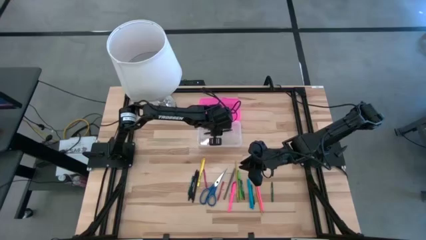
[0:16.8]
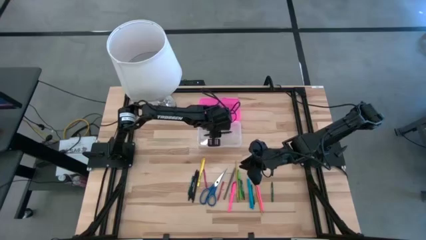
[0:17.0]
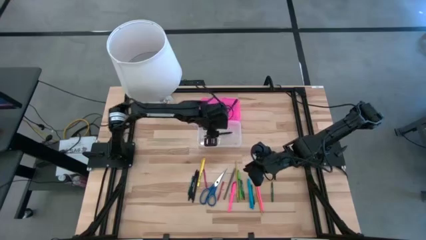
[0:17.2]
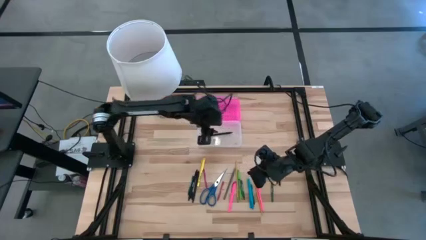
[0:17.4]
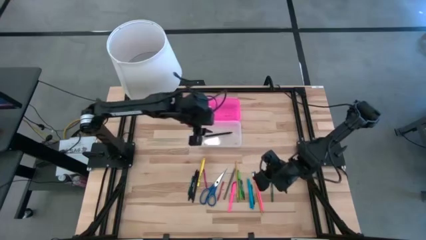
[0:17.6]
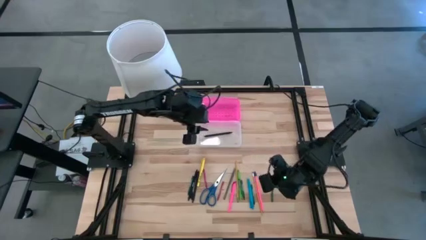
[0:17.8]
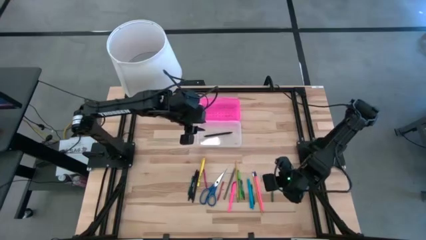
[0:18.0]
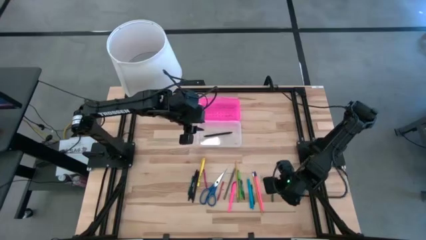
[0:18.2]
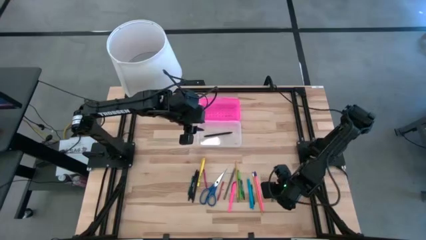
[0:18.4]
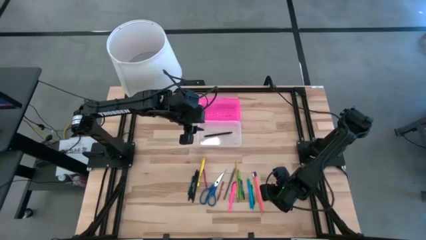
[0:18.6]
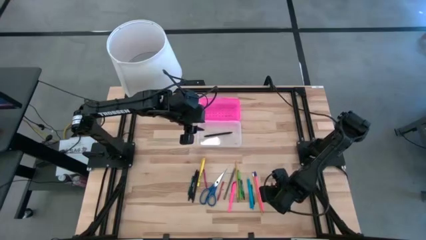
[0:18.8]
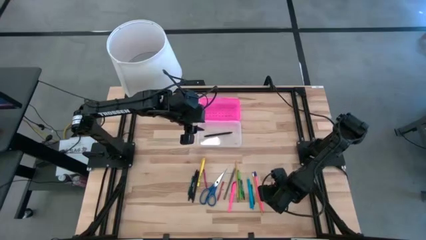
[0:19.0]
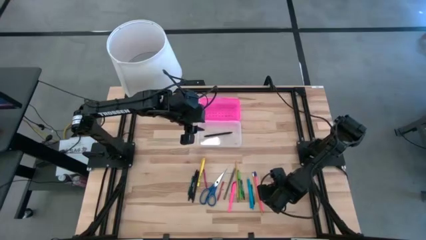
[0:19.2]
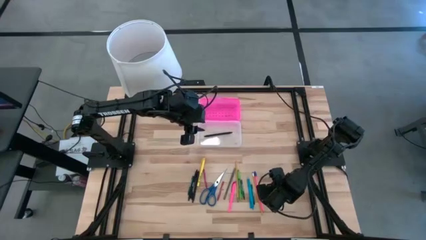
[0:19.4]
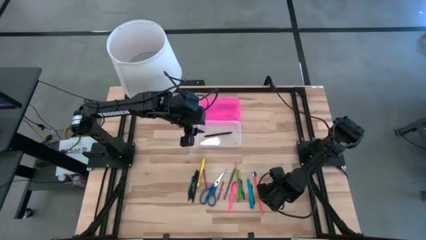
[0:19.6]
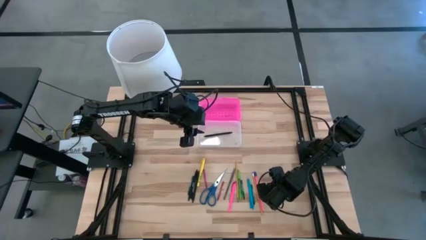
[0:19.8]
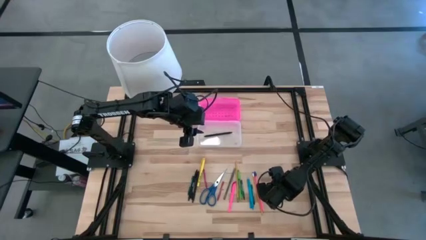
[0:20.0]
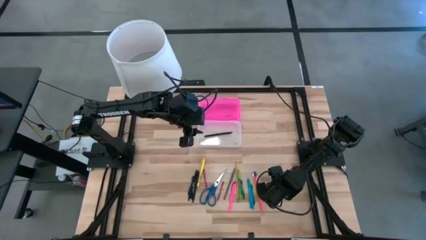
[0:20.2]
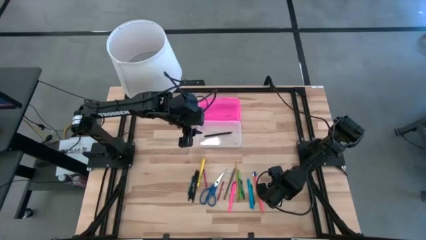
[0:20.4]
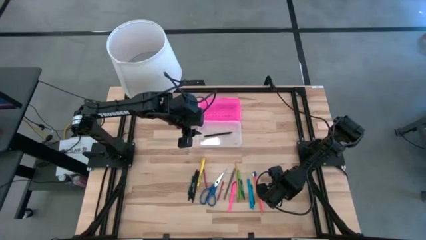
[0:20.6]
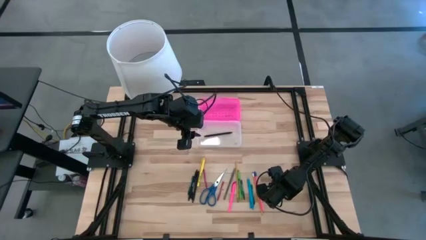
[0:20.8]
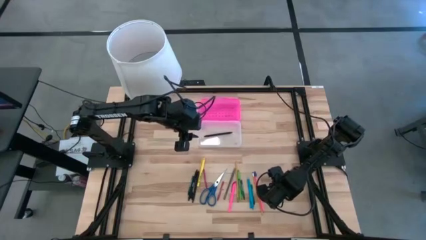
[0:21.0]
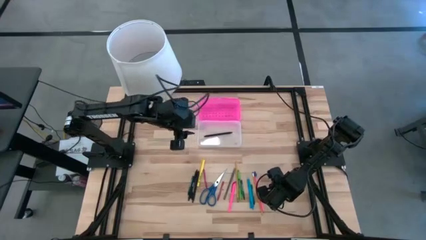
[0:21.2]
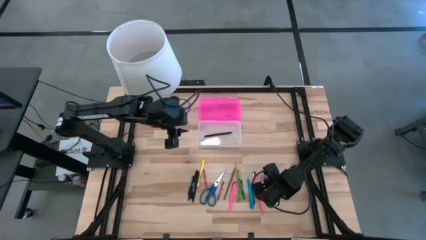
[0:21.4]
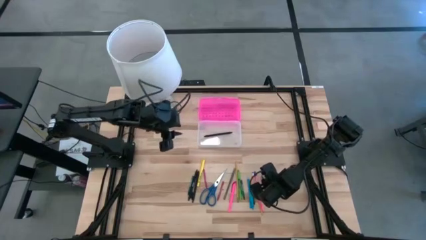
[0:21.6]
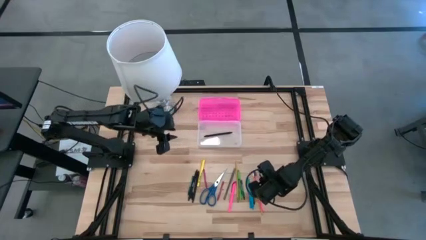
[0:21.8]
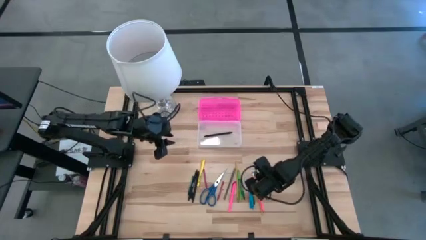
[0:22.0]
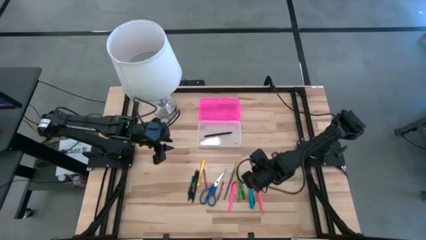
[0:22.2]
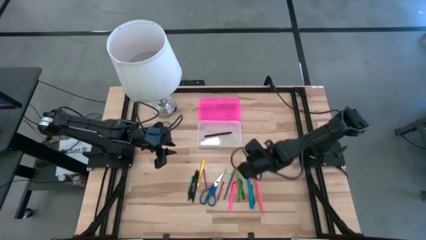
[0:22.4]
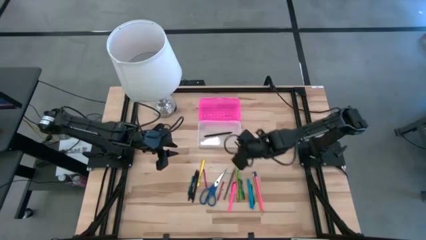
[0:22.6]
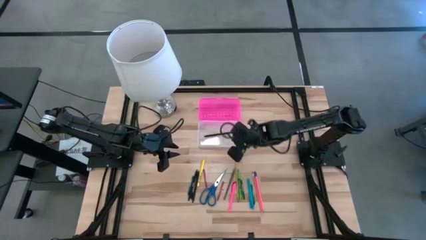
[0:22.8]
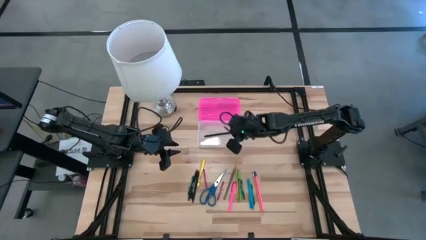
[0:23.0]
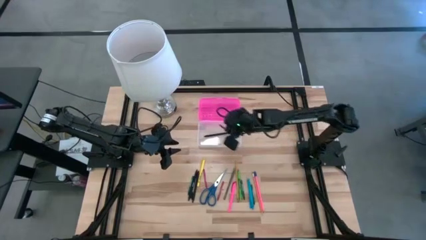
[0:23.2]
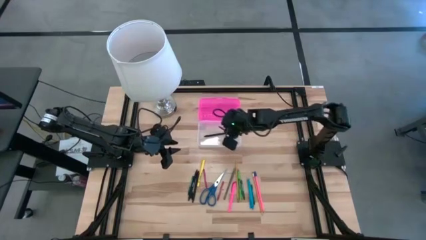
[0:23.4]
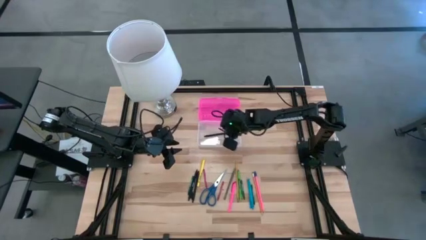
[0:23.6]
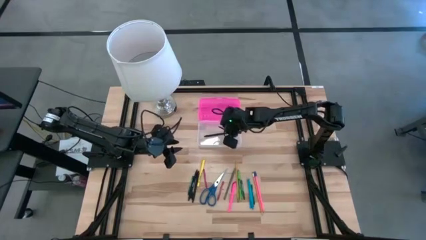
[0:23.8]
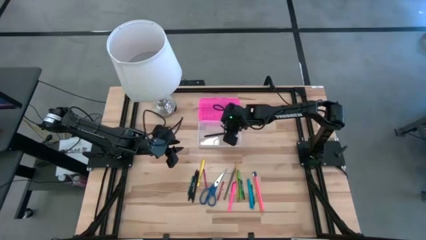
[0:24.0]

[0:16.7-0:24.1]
Task: Pick & place school supplies into a supply box
Put the right green crayon into the pink supply box

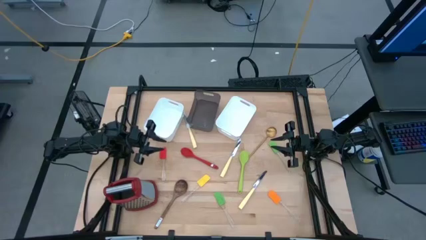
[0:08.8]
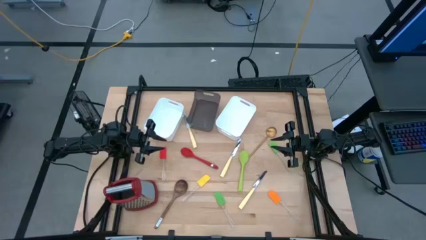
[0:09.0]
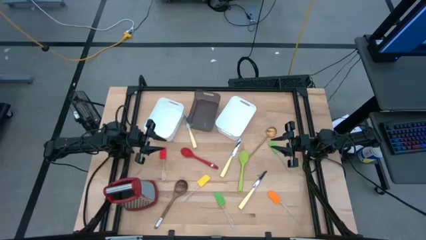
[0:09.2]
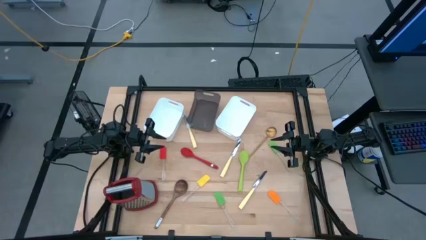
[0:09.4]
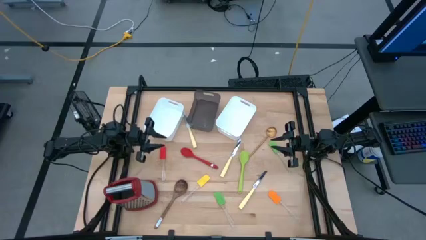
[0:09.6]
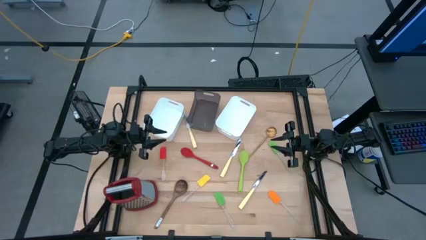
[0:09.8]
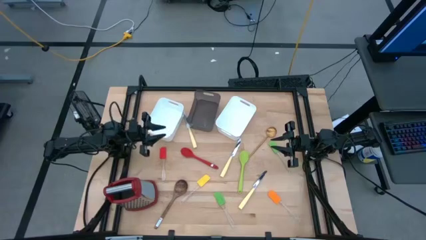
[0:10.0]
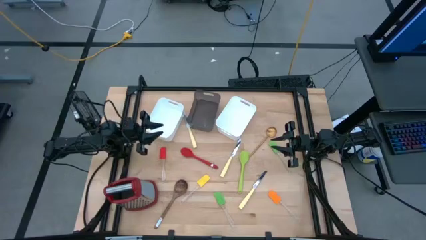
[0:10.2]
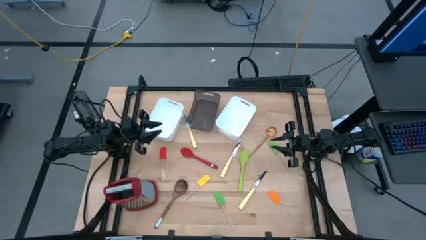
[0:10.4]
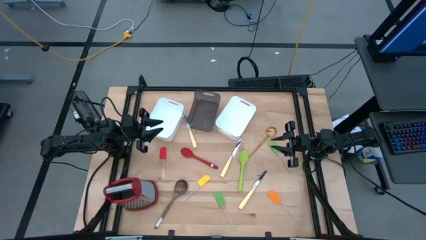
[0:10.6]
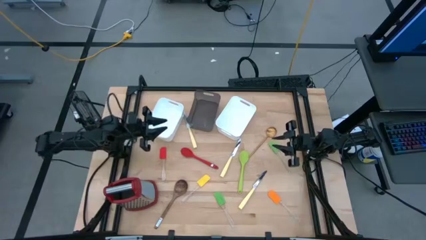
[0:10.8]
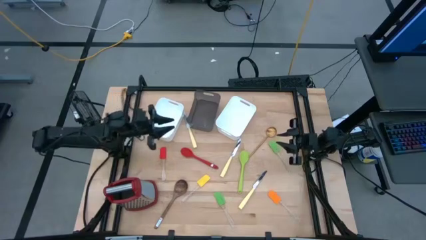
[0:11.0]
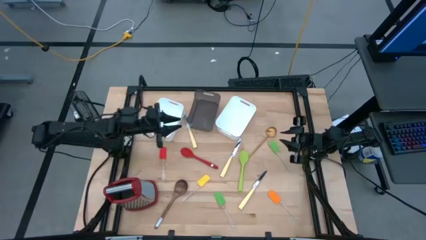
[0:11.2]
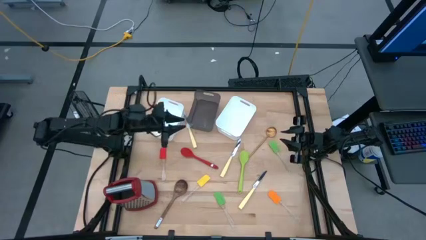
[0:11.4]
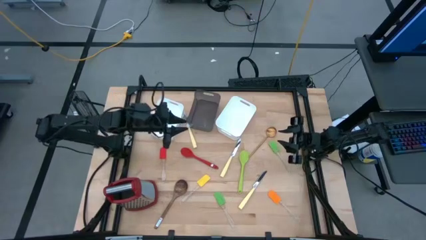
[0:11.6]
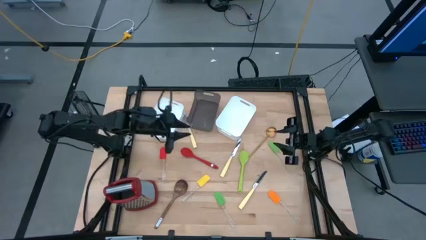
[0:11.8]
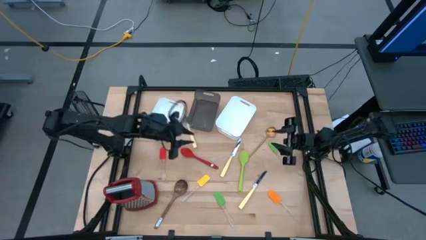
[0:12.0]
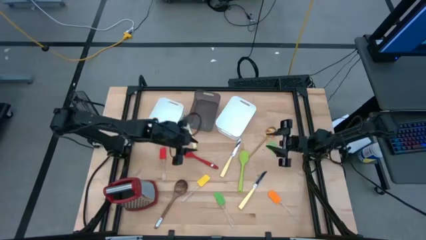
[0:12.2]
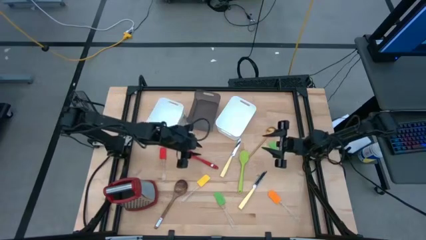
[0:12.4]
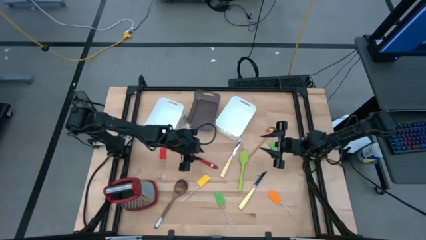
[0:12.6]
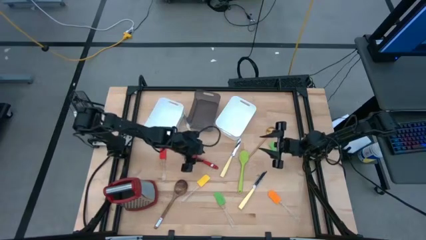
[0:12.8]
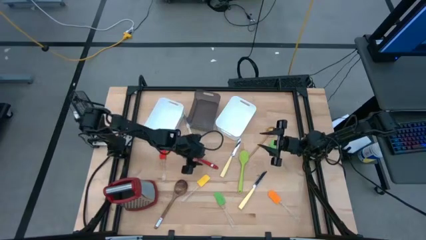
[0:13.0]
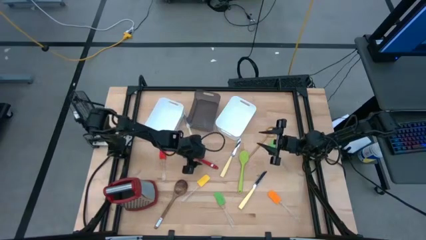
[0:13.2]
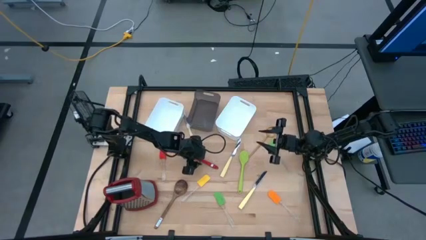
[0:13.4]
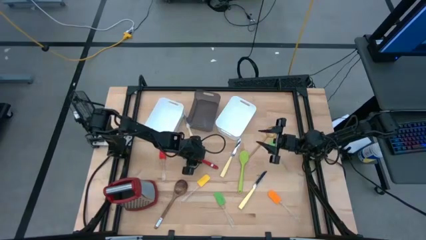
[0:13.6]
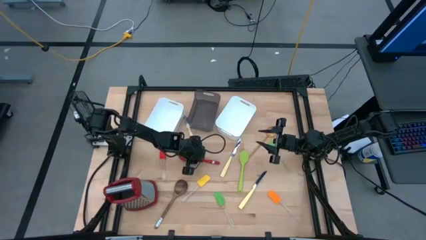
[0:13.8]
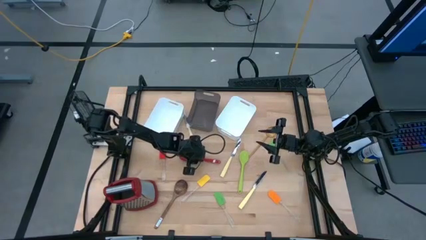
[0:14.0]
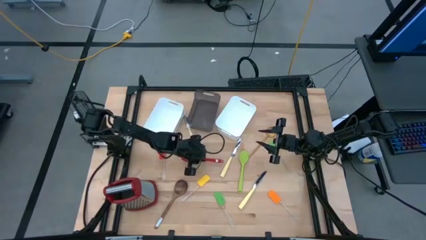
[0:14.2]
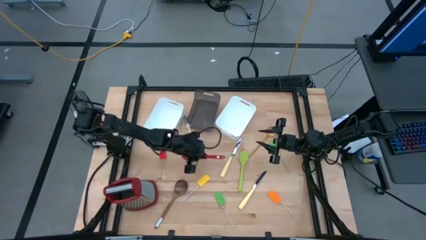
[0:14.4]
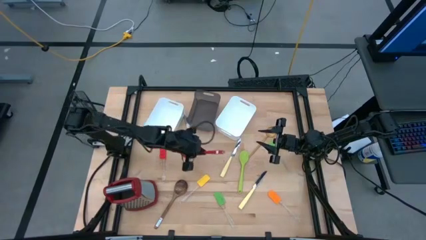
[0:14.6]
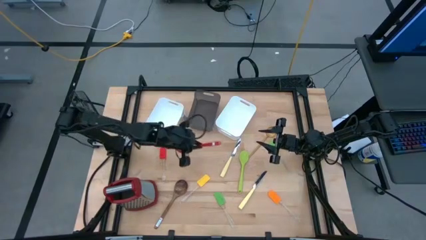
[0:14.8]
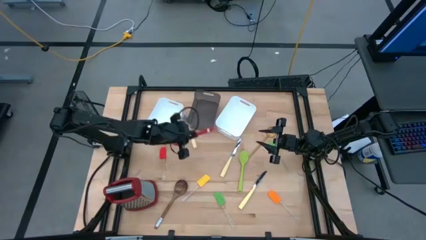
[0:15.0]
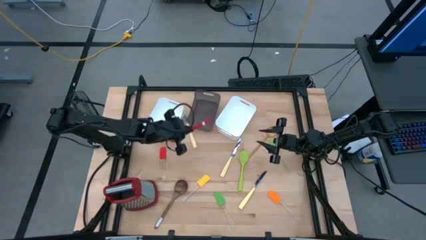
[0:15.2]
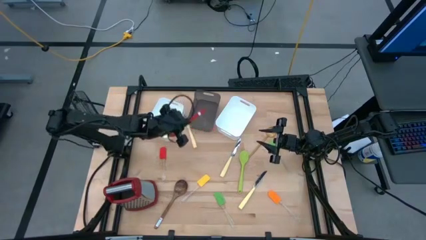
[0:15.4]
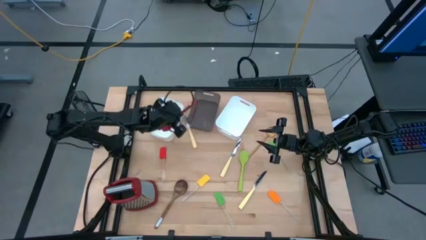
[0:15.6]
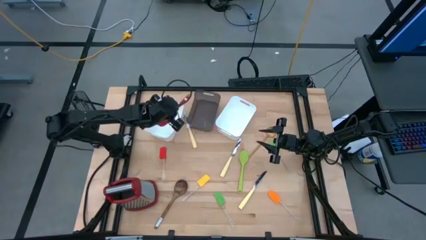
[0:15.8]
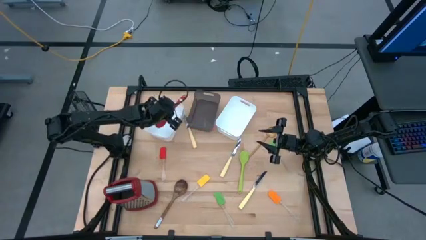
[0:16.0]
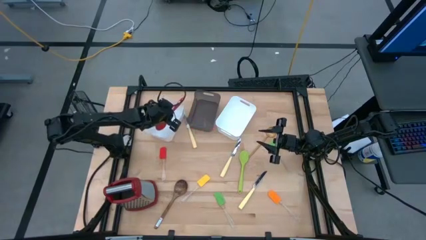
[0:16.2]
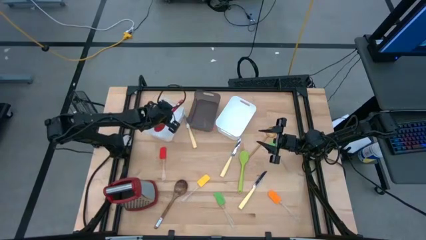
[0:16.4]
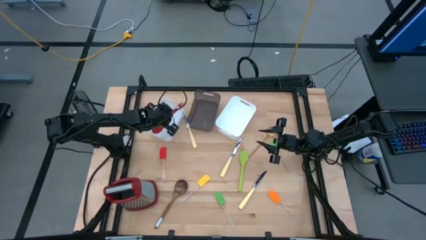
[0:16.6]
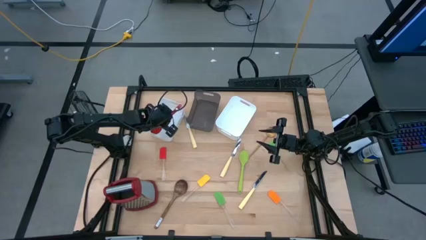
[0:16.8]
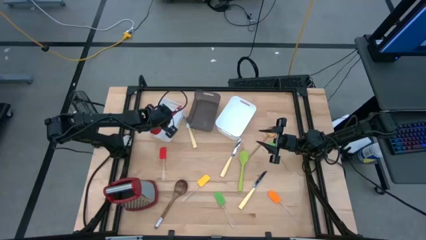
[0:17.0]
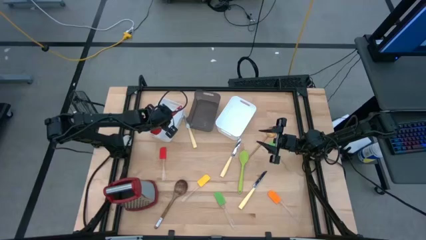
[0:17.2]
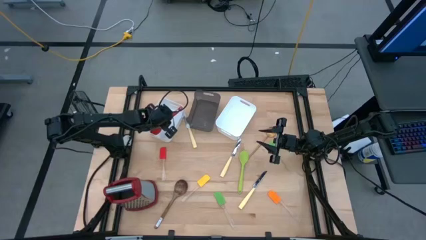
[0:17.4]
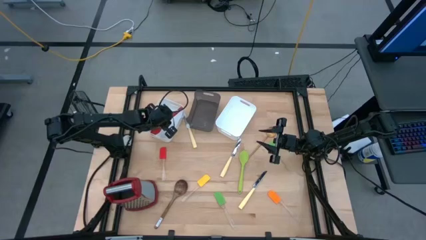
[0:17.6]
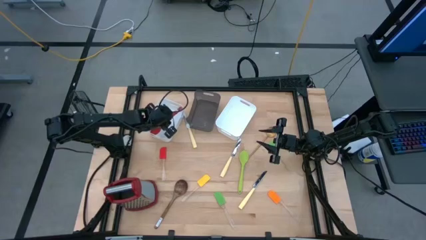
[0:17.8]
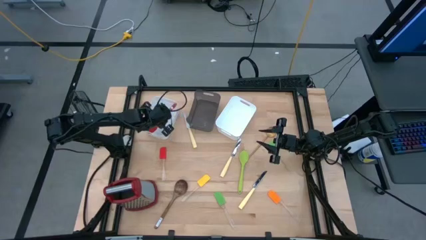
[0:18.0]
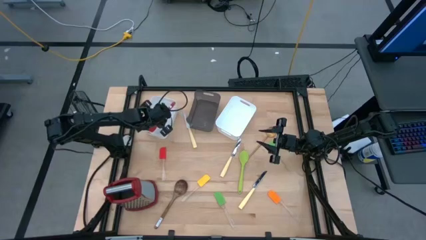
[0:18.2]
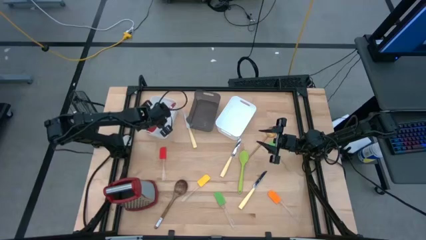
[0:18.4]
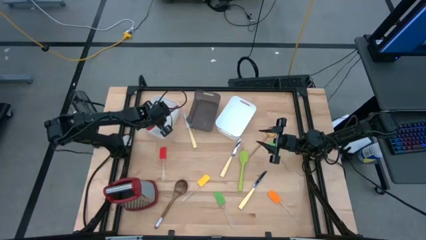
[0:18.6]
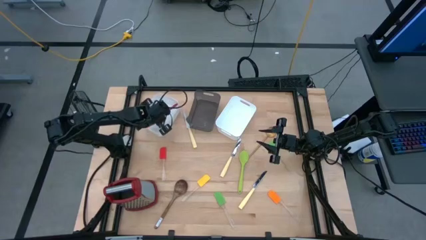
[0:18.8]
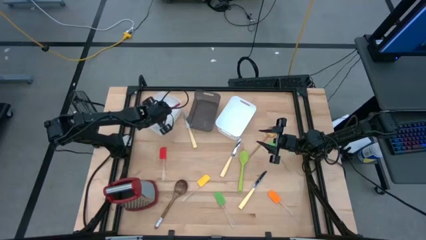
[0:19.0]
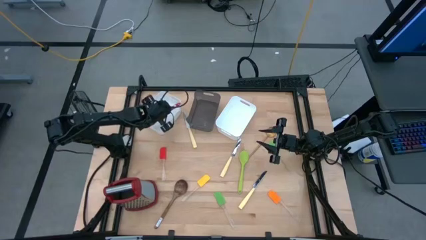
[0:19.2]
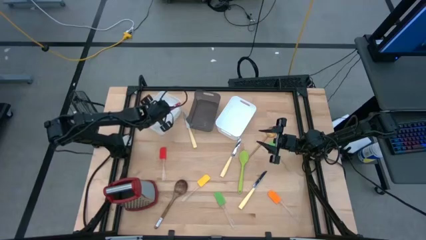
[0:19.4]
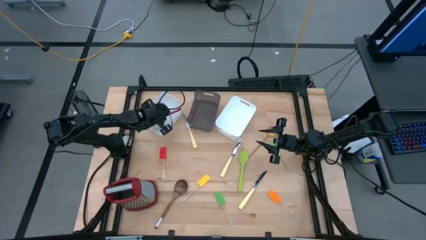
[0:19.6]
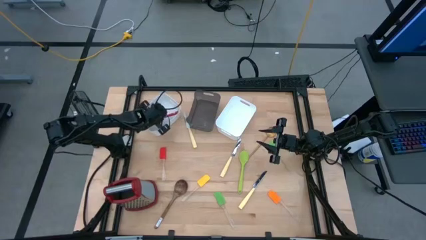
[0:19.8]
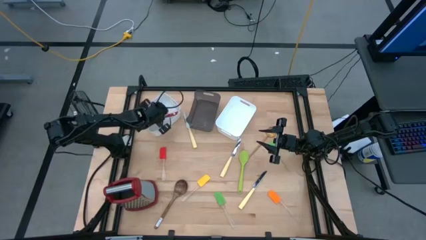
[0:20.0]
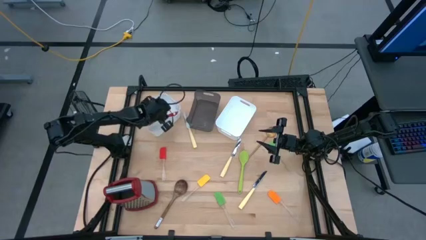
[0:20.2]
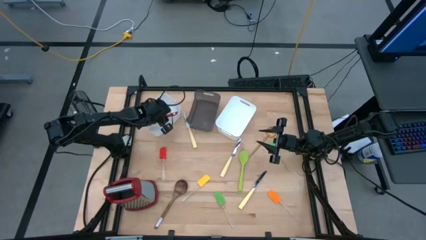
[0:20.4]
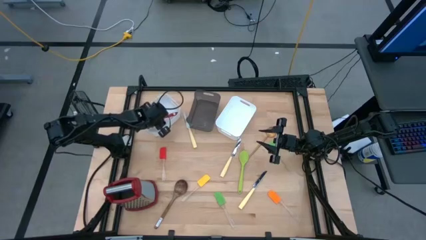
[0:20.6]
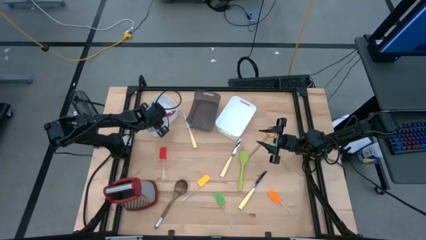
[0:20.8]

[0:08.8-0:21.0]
Task: Pick & Place Kitchen Items
Put the red serving spoon into the left white bin
